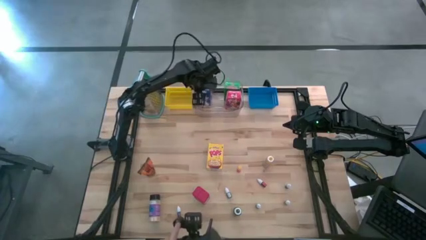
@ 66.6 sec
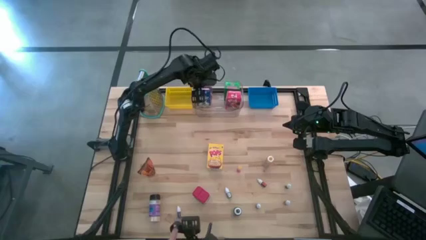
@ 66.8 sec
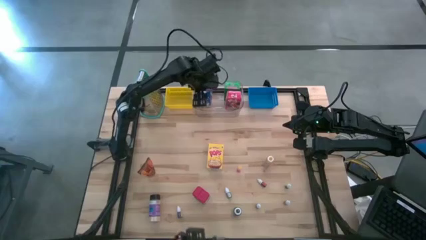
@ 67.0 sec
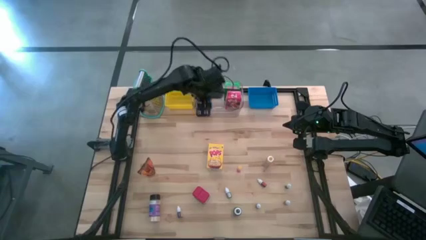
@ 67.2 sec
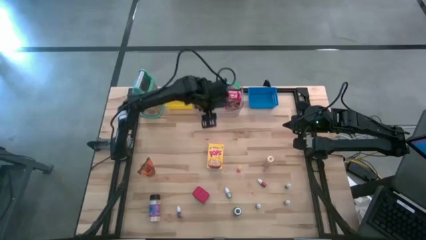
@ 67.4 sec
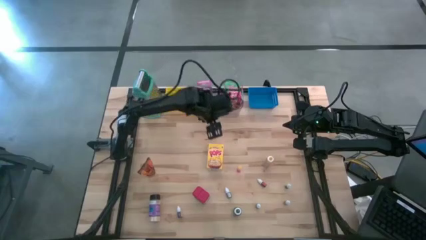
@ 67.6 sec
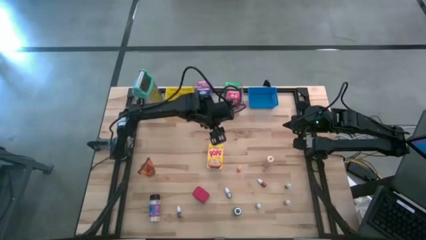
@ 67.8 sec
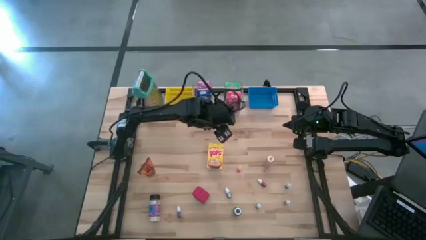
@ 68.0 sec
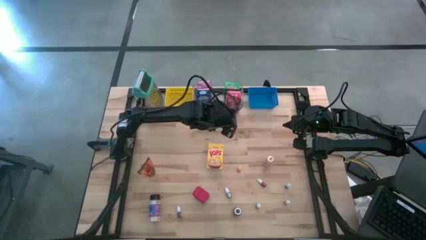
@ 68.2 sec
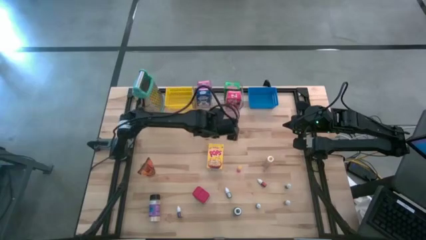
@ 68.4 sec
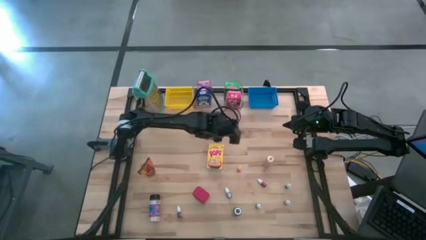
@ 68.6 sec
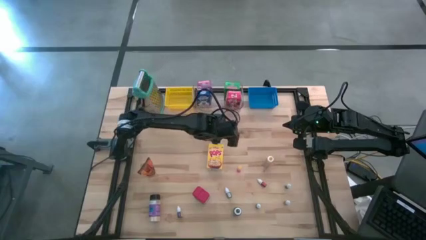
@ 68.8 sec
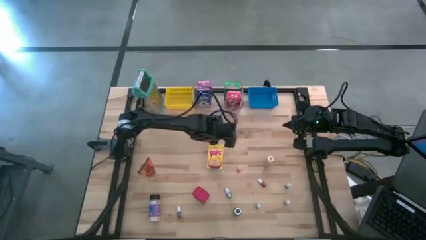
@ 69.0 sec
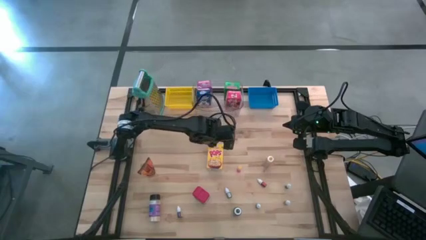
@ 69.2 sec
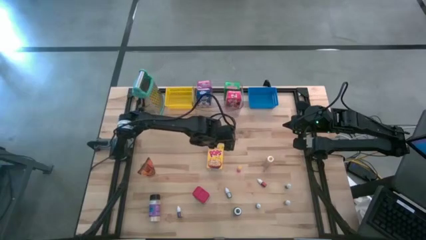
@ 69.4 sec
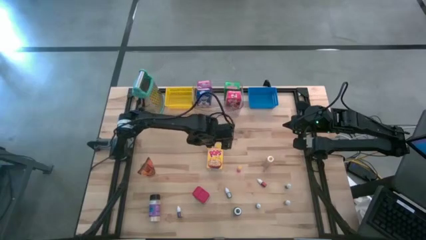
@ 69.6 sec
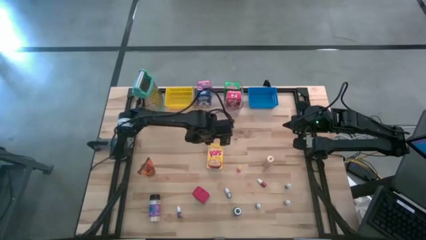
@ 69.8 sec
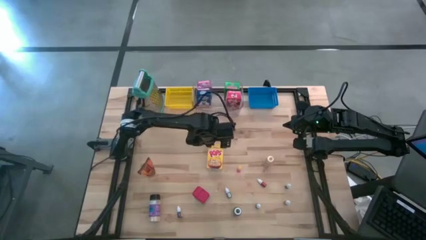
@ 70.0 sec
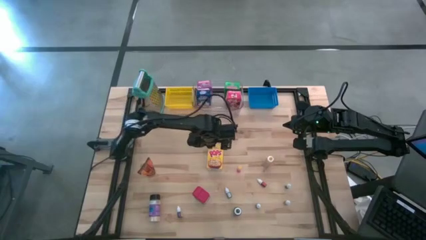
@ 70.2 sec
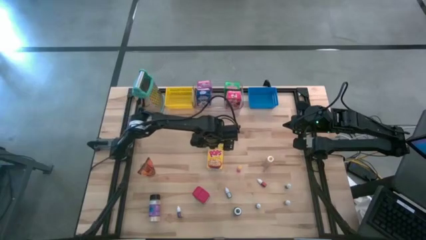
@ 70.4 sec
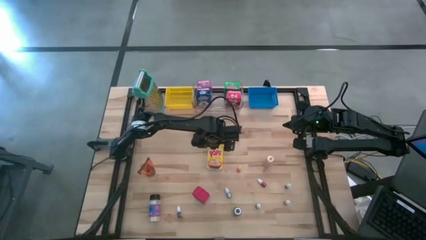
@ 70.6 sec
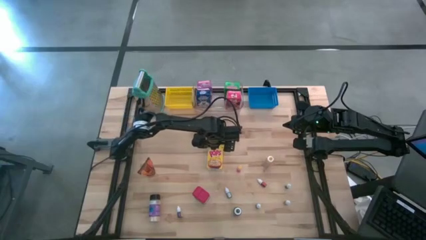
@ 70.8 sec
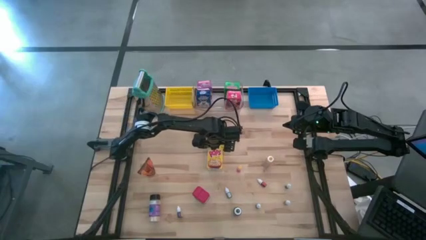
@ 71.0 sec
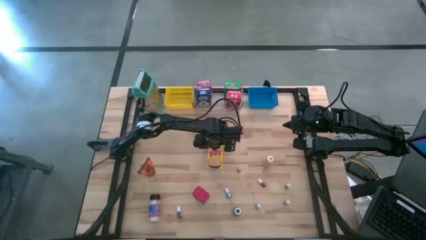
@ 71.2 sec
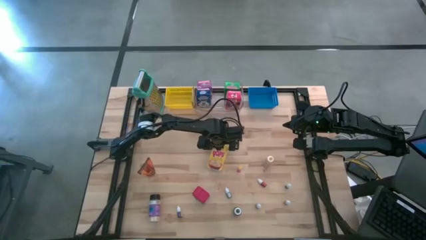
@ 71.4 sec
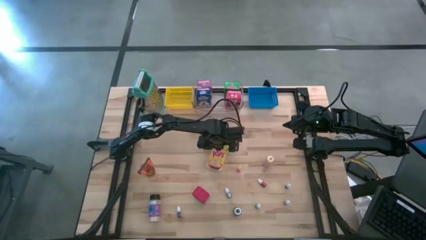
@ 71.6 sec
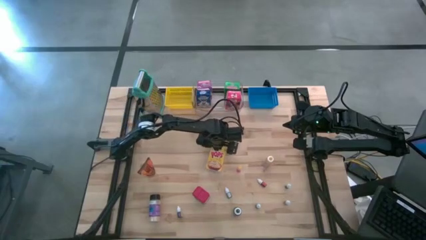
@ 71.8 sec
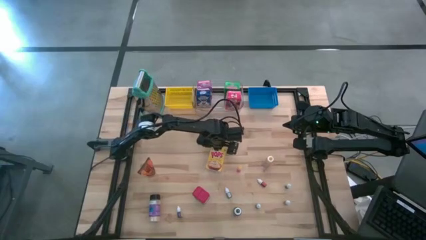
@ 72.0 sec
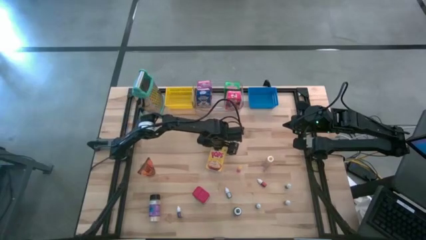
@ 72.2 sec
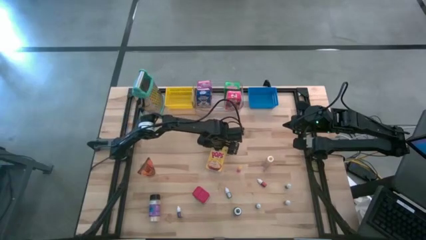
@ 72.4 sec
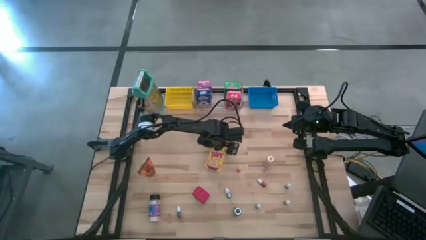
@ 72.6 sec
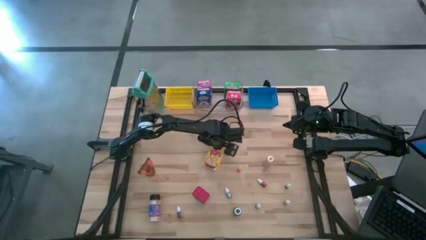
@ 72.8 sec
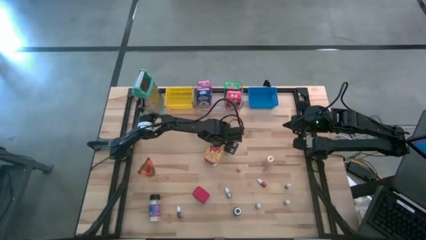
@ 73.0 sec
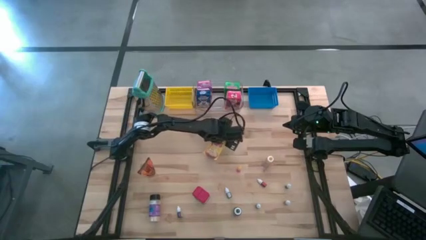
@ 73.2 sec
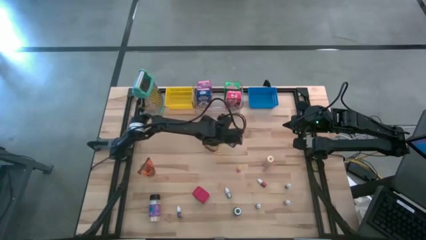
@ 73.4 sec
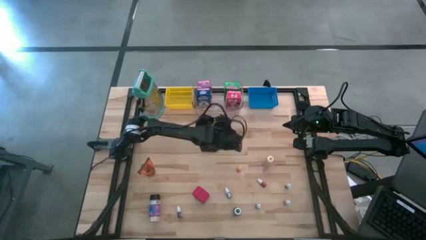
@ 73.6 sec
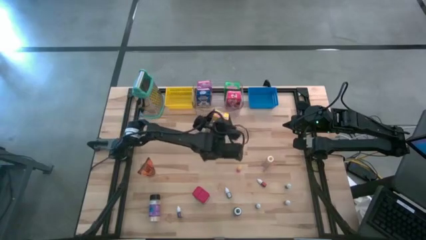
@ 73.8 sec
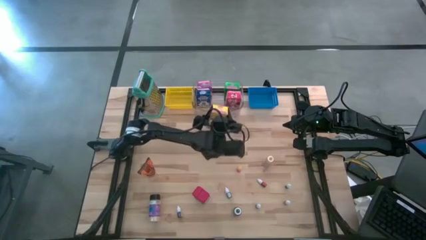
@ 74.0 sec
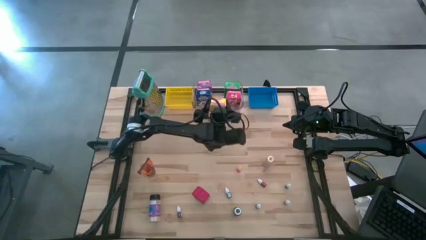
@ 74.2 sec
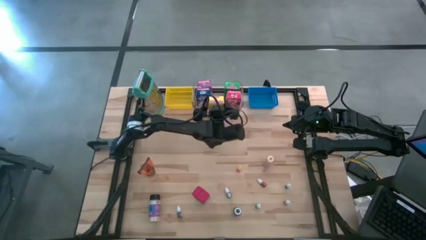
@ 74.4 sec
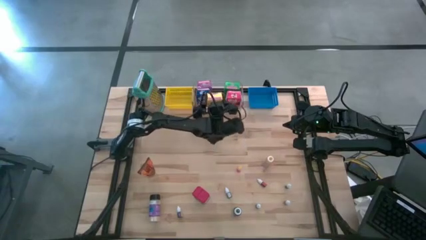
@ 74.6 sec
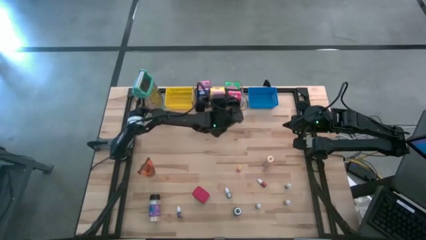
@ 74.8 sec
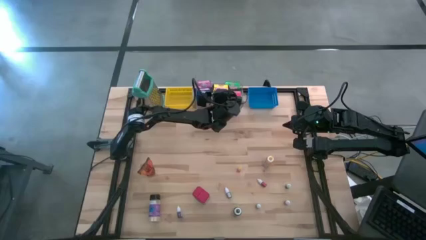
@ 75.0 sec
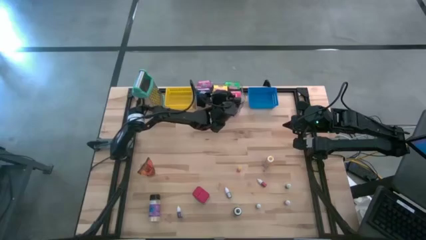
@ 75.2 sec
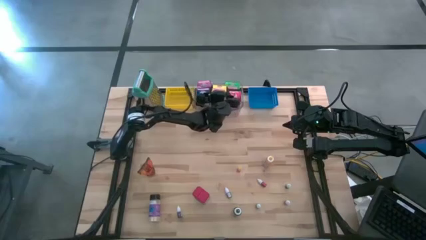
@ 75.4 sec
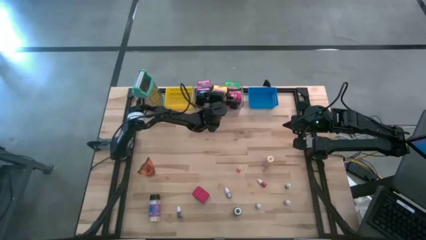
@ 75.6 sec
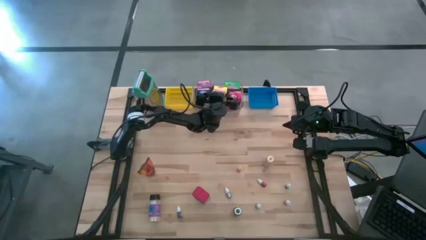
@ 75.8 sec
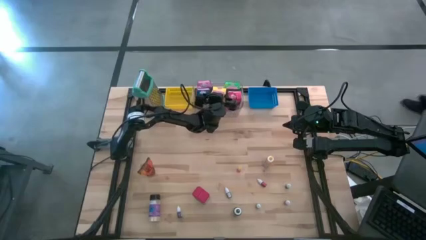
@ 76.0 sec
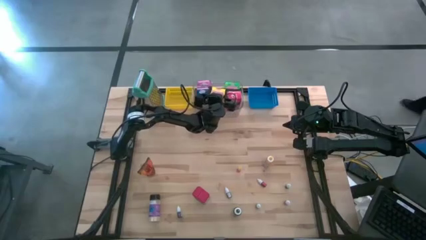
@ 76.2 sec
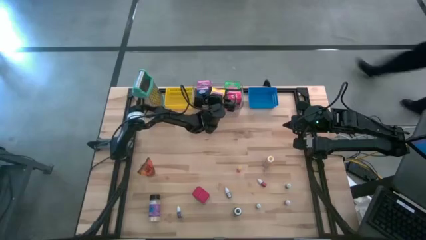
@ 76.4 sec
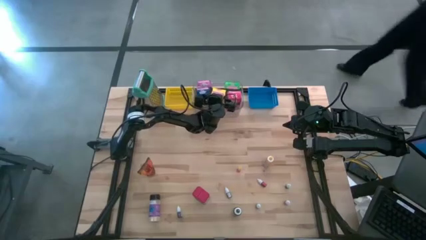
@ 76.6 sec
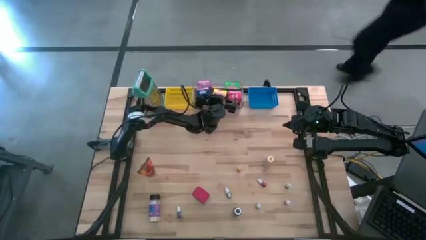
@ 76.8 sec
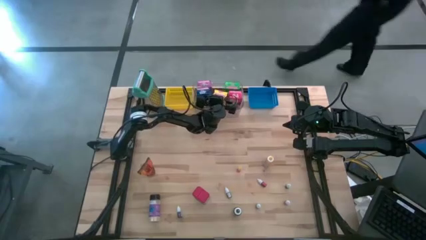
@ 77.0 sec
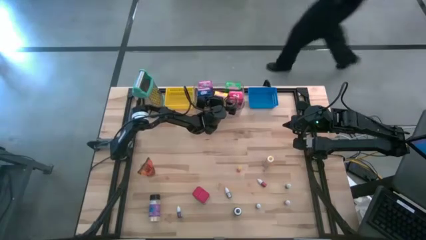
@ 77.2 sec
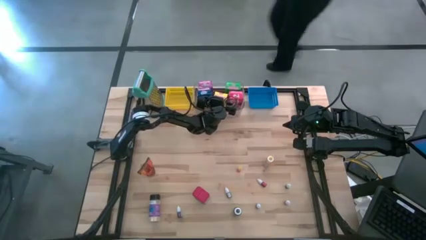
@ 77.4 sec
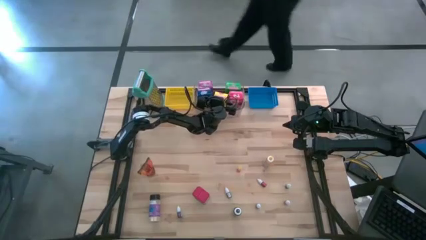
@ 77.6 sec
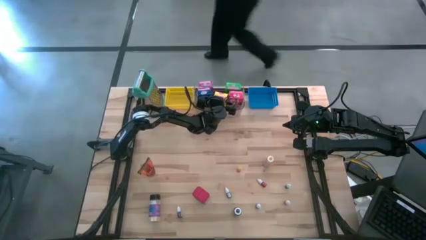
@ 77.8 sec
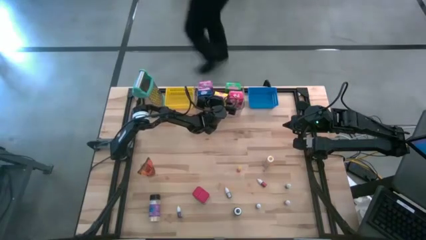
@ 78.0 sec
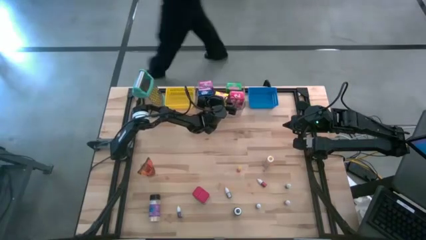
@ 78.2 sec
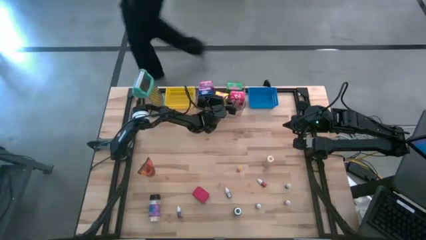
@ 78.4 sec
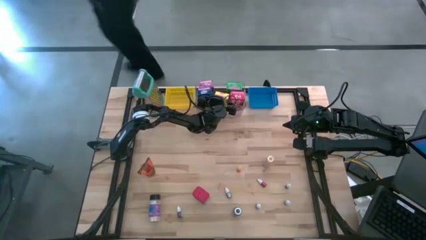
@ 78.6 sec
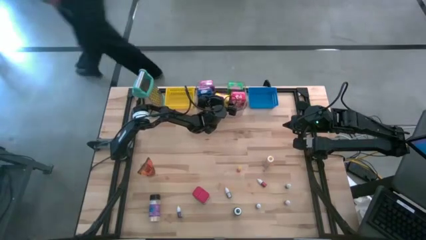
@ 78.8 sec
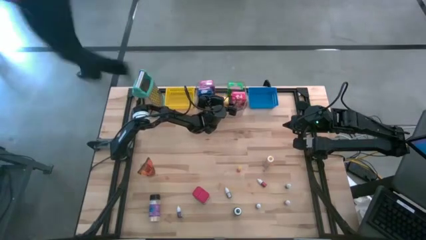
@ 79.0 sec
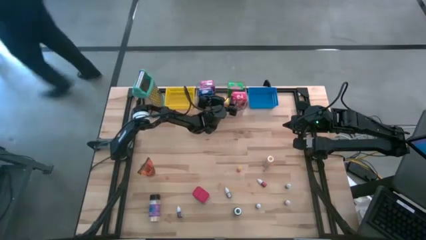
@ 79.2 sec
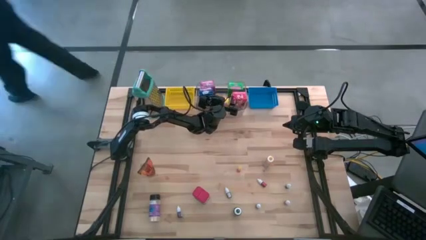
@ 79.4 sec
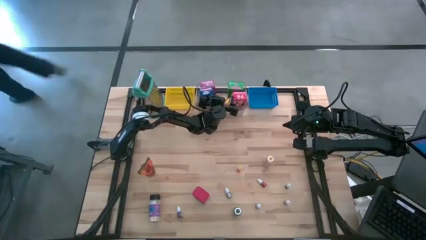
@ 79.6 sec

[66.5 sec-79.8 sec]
Task: Pick & Place Kitchen Items
Put the yellow cereal box into the transparent bin
